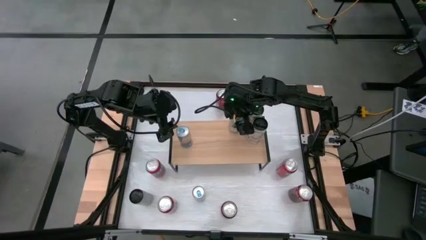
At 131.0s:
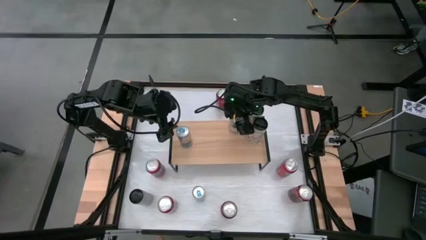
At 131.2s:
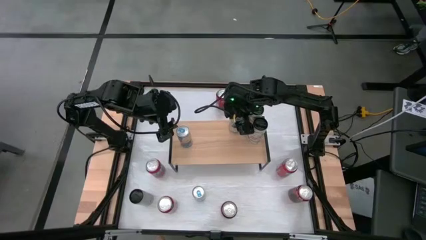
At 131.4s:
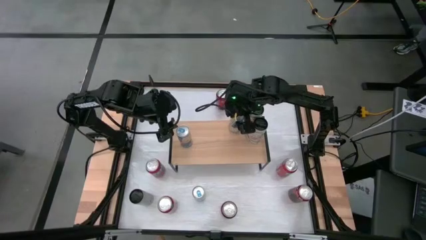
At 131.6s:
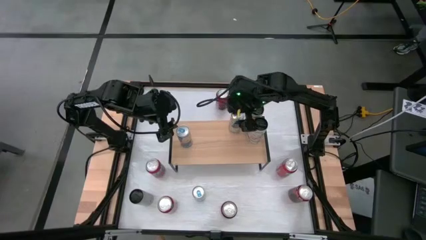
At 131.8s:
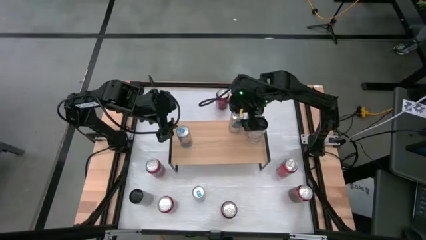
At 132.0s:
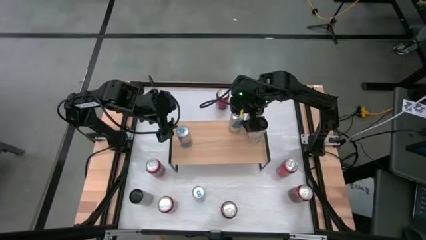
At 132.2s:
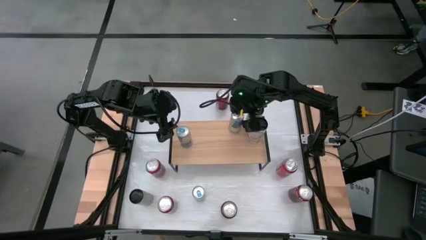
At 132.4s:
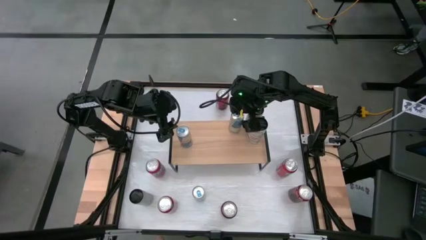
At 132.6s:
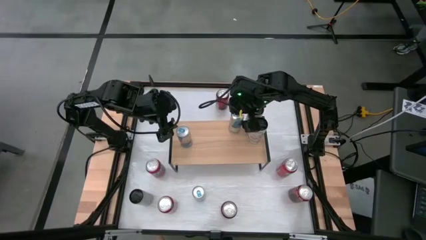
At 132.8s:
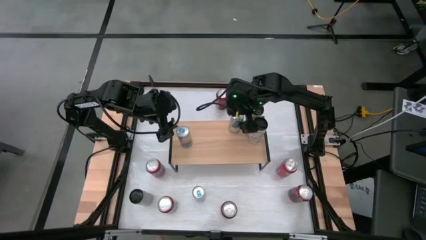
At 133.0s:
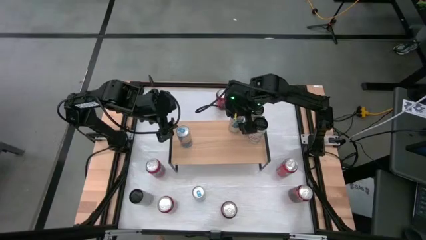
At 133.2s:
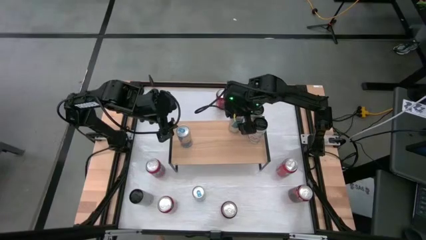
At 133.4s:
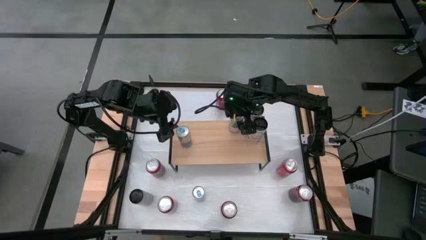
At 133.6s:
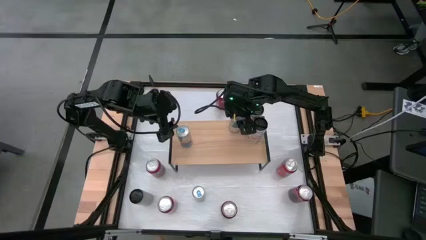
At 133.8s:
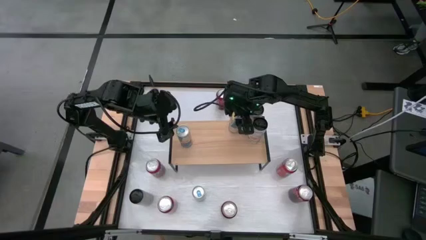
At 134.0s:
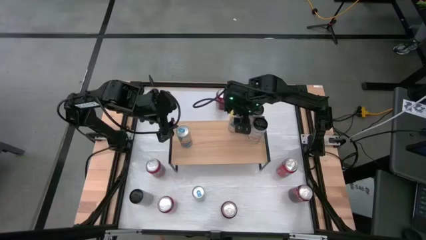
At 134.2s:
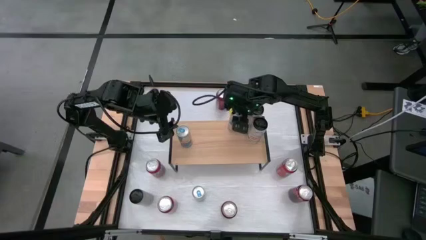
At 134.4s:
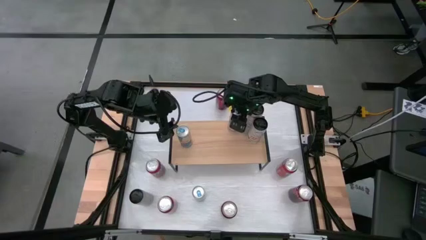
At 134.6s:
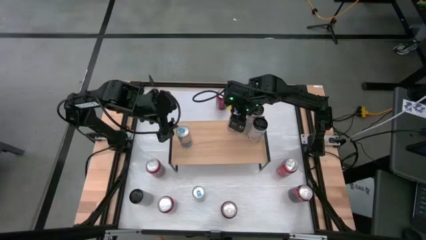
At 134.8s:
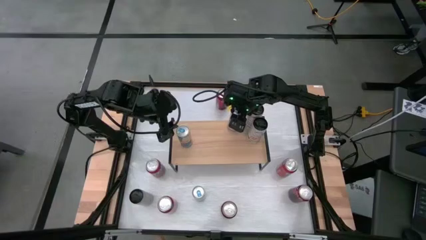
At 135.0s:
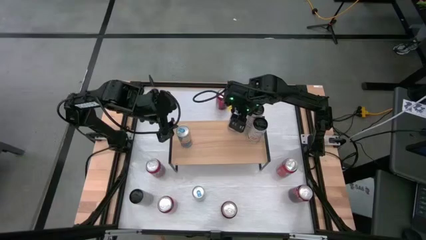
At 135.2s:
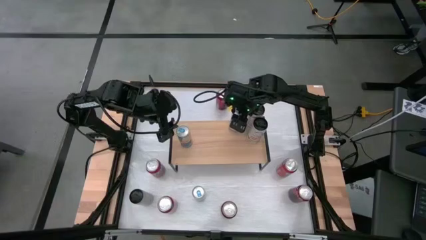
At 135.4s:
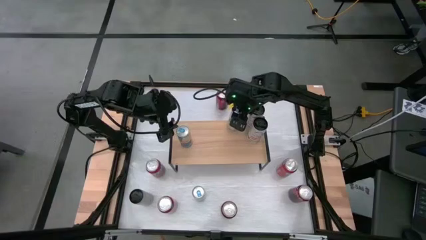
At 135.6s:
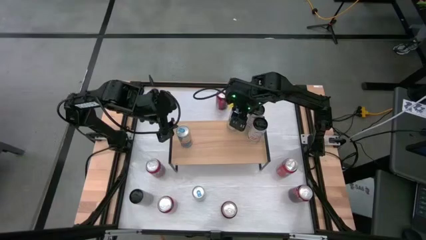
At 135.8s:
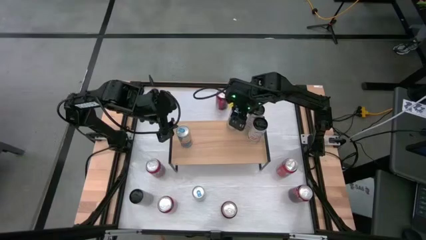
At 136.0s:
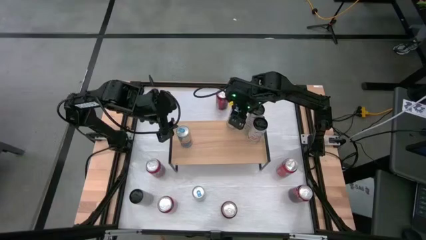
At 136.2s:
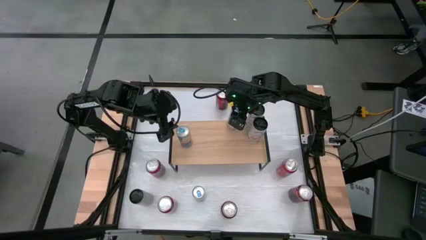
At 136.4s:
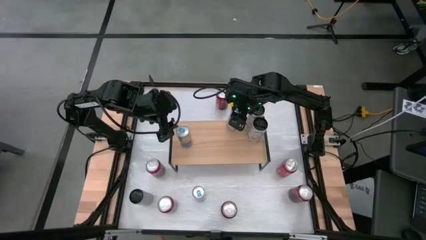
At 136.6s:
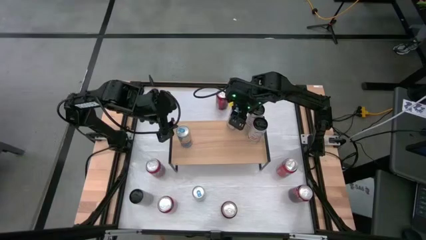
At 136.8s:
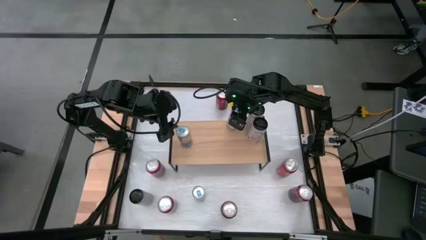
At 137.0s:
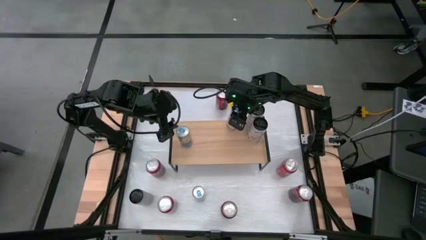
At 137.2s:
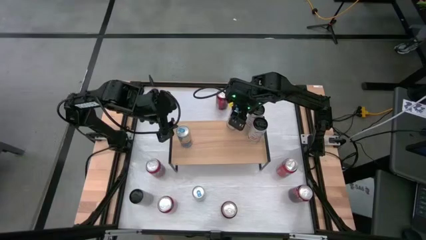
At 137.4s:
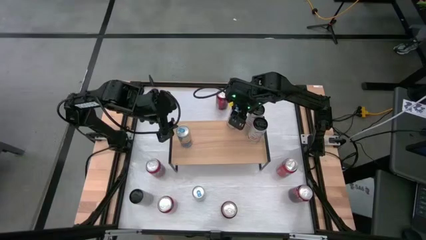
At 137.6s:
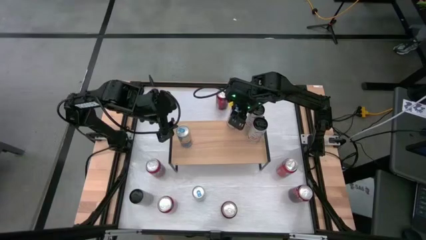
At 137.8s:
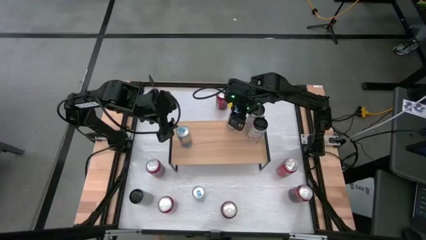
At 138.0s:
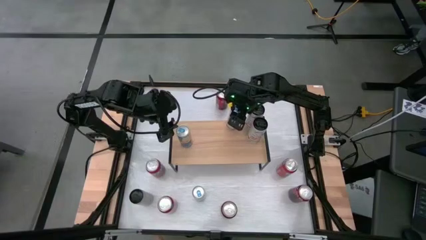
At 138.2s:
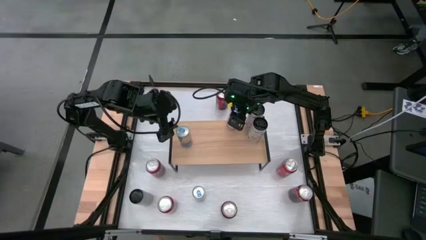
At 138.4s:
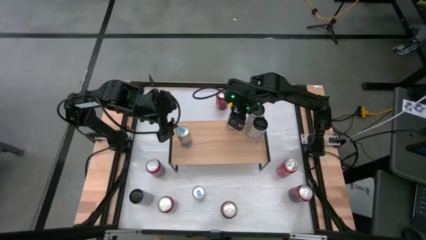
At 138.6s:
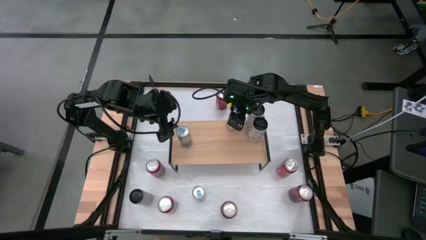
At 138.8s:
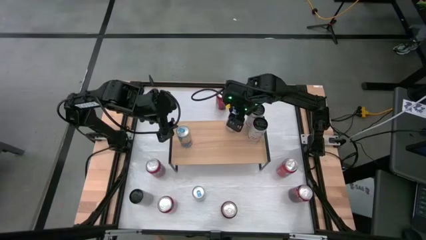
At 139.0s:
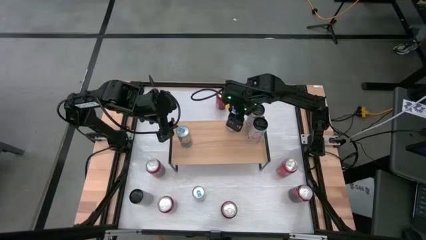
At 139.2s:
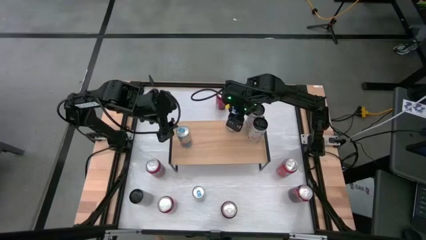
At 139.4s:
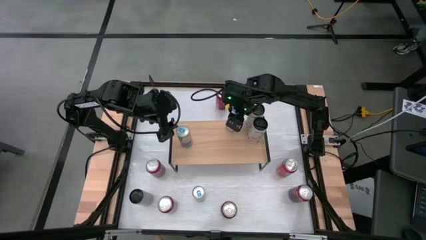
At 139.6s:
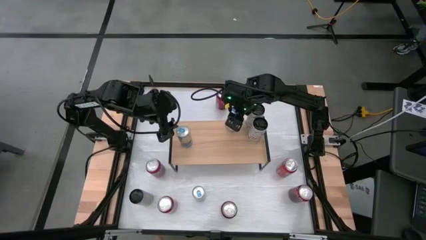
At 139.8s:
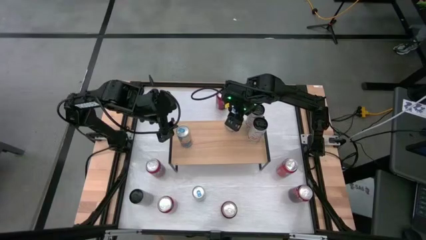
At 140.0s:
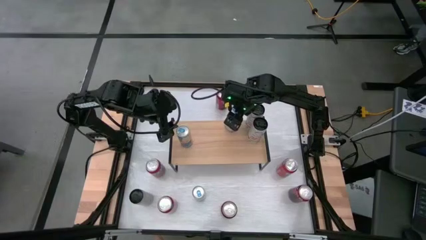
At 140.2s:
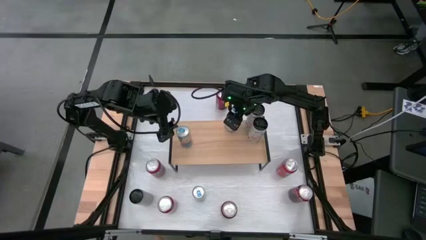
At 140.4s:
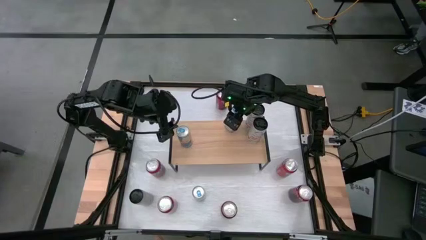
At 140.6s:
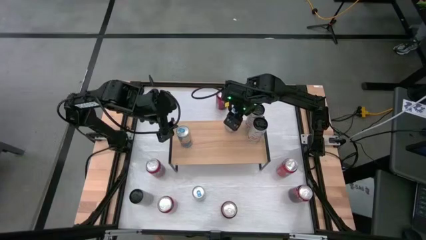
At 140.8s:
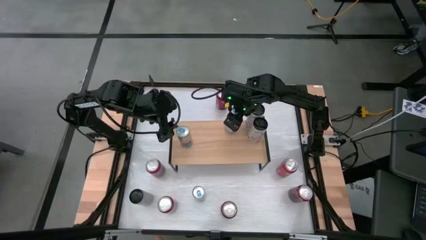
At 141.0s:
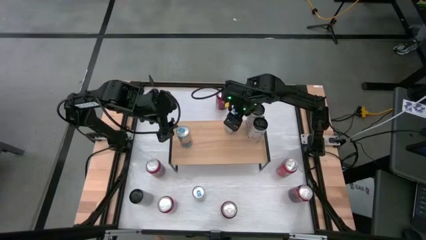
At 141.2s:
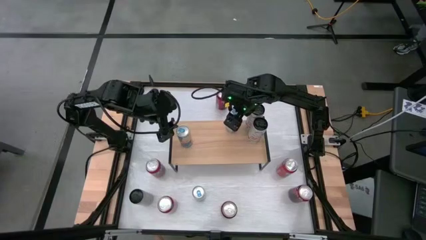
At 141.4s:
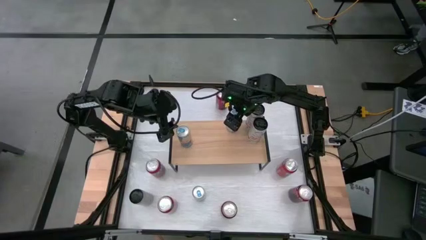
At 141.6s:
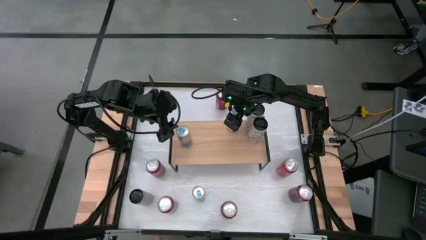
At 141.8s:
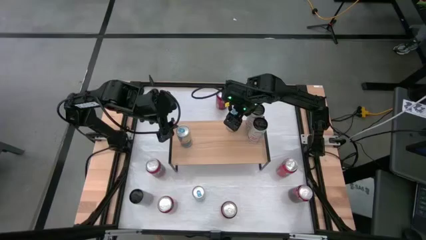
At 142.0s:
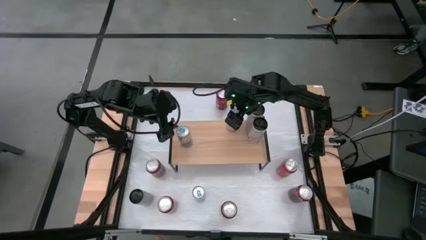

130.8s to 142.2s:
Task: Place canned beverage on shelf
Adjust the right blue soda can on the shelf

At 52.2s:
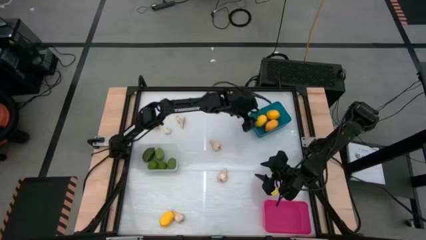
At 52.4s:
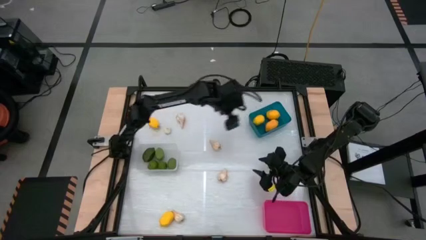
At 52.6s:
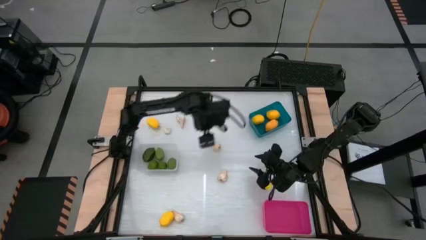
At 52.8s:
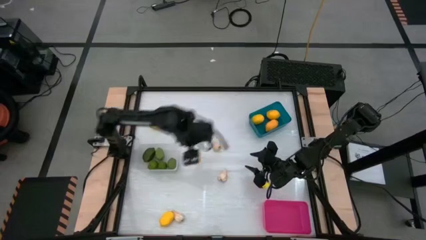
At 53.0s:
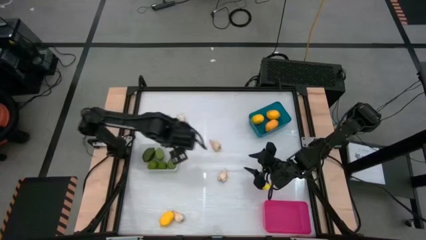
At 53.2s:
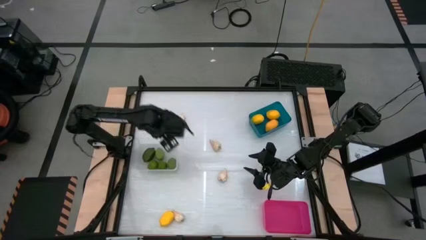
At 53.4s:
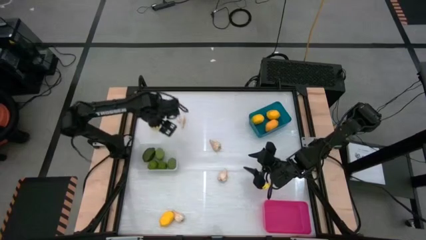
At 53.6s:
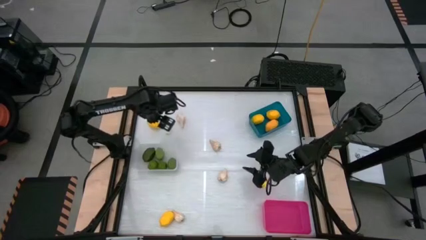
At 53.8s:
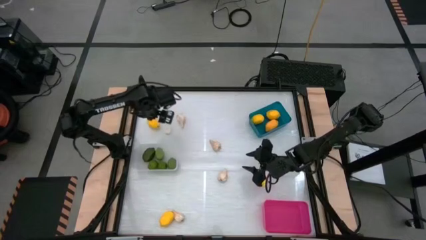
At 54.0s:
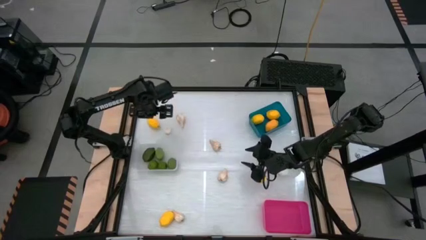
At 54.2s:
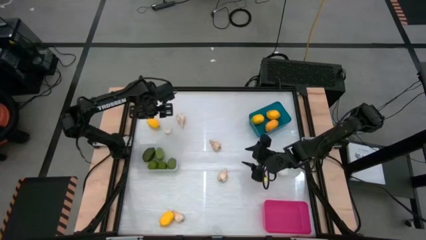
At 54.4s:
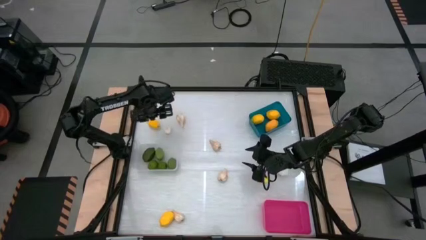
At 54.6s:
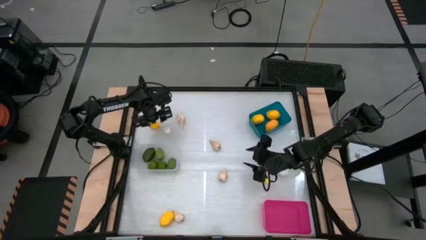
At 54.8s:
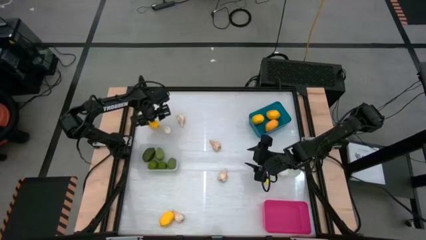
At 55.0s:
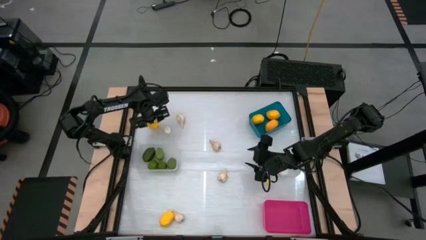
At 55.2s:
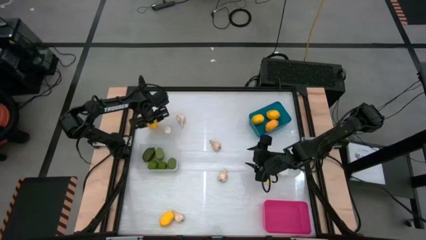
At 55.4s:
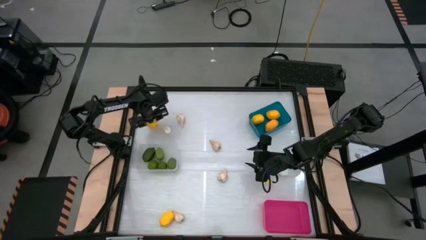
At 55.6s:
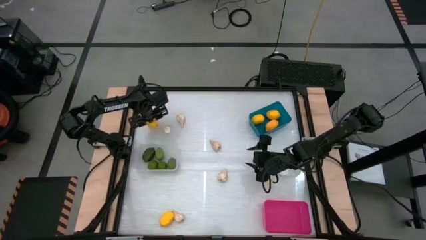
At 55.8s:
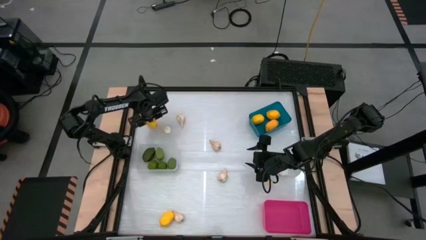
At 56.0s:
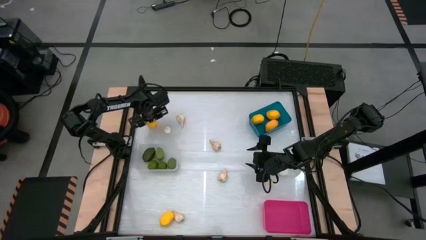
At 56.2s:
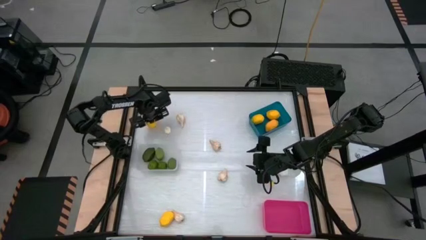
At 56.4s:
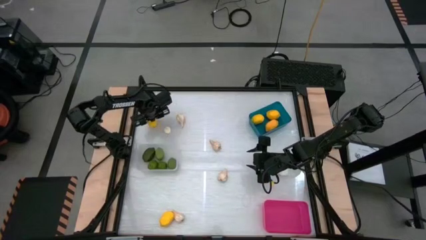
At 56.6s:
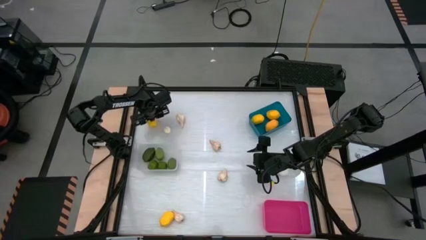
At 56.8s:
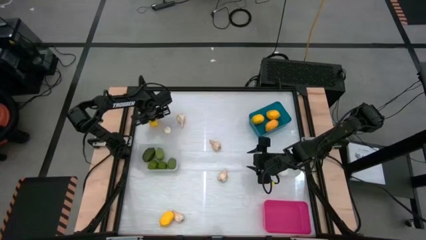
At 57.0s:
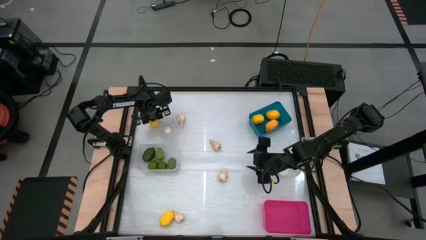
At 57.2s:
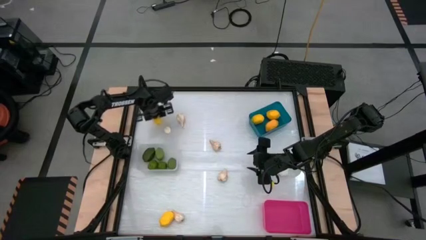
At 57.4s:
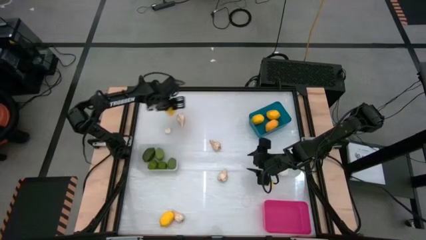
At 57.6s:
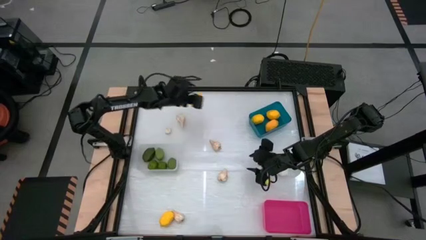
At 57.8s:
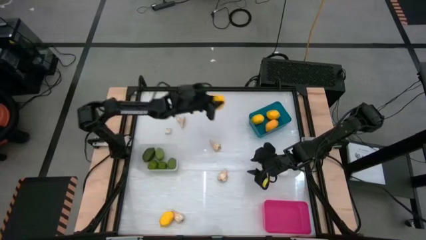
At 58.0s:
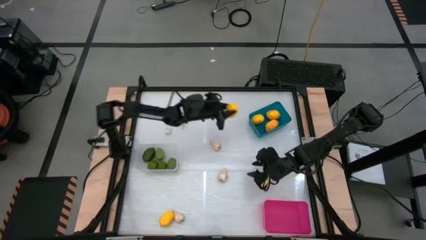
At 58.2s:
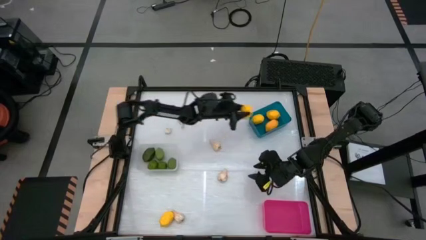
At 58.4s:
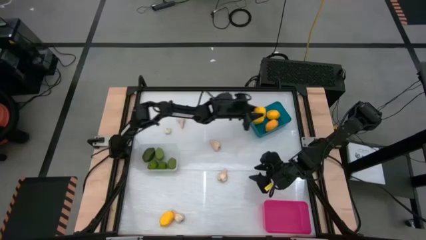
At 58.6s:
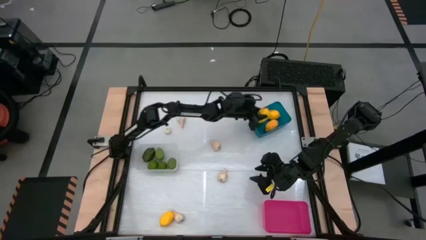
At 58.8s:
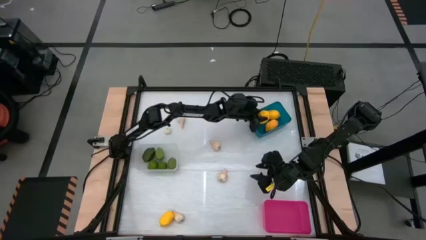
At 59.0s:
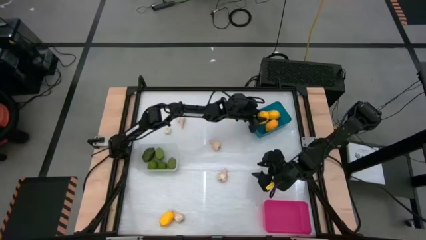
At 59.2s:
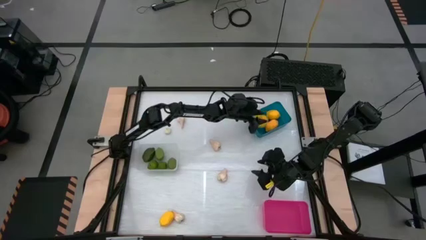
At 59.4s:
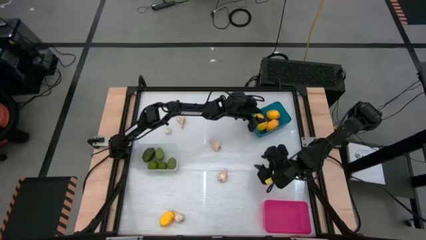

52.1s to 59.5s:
Task: Sort produce into baskets
Put the yellow lemon into the blue bin
